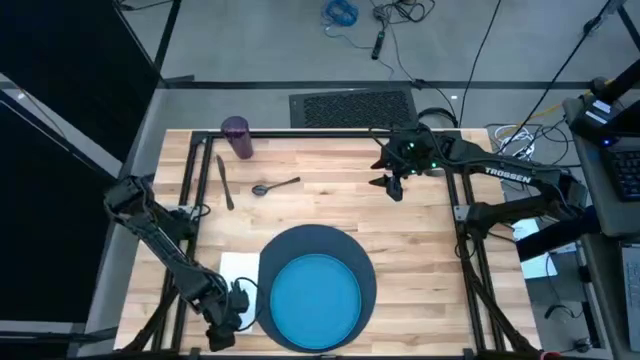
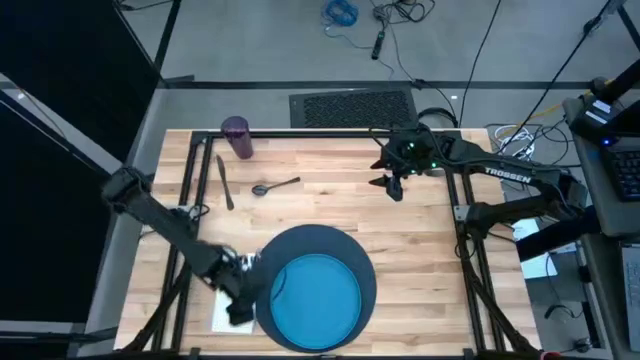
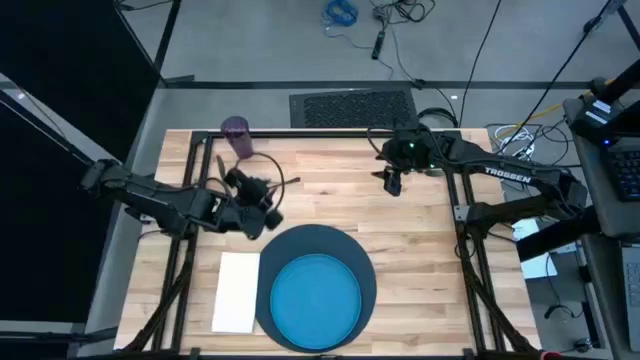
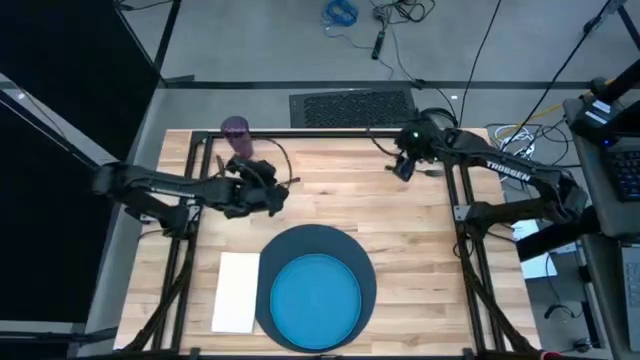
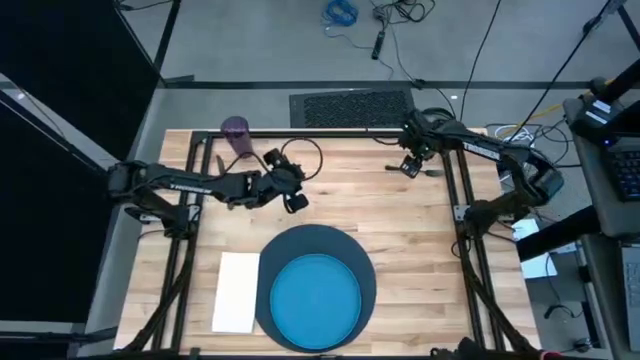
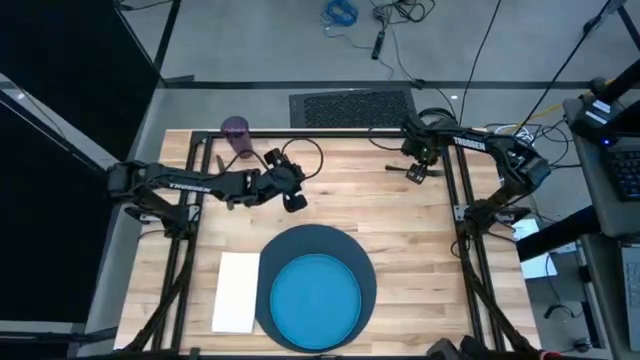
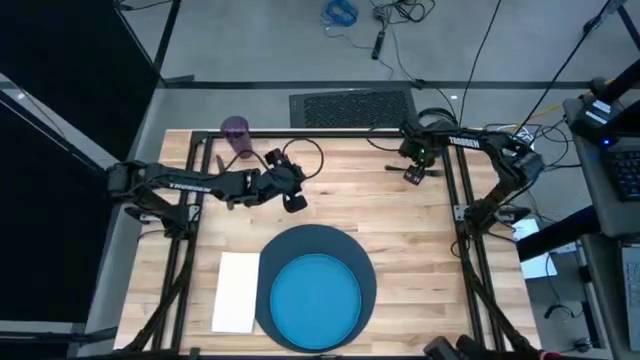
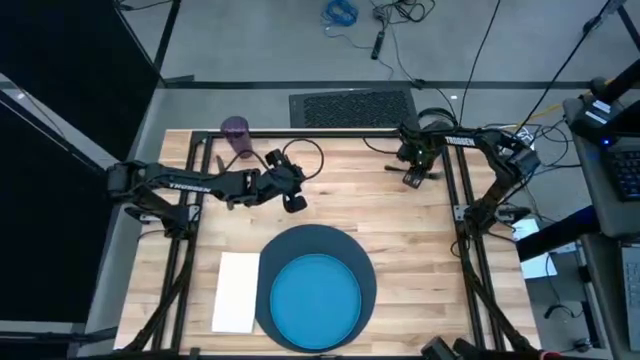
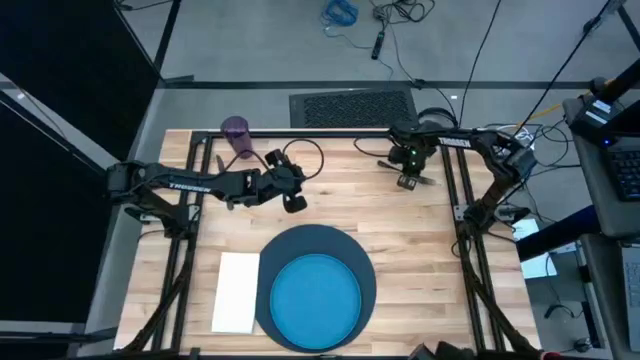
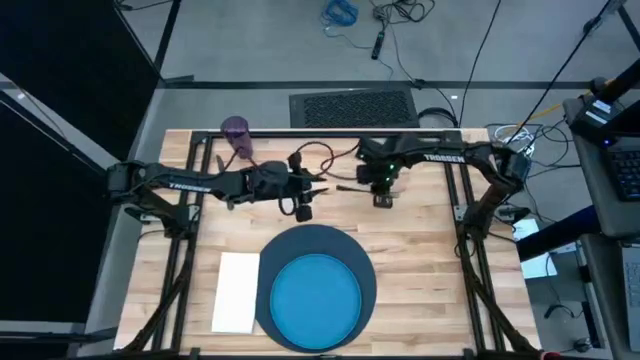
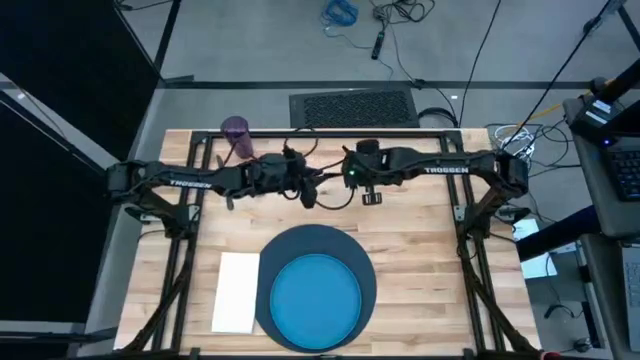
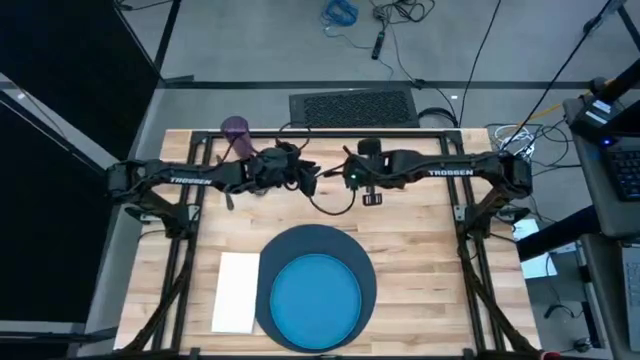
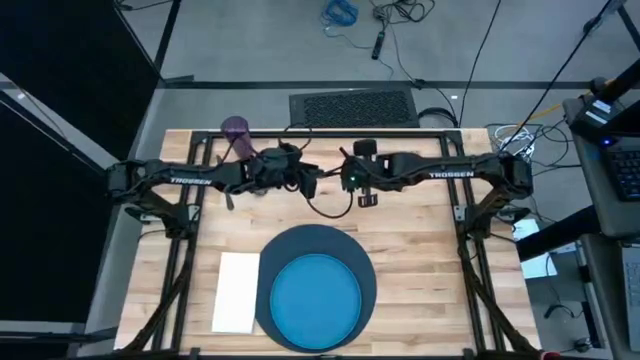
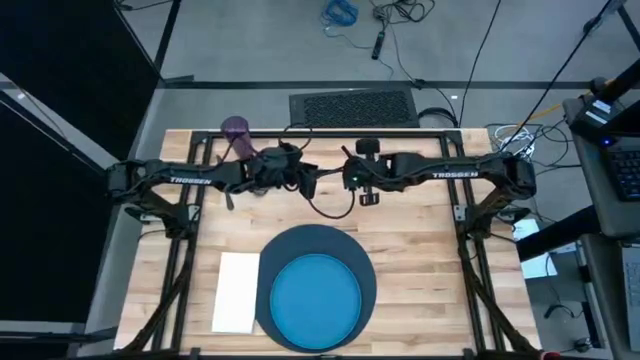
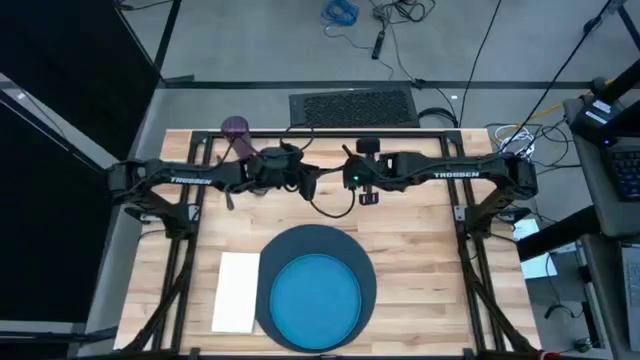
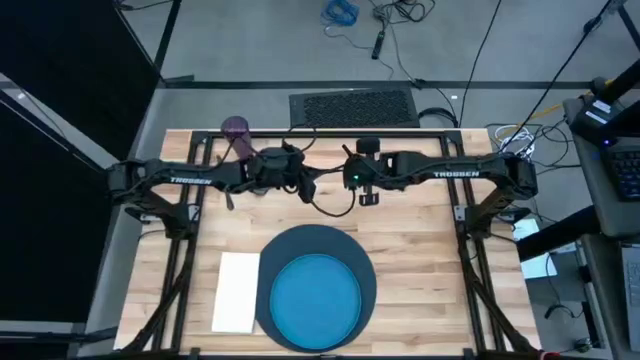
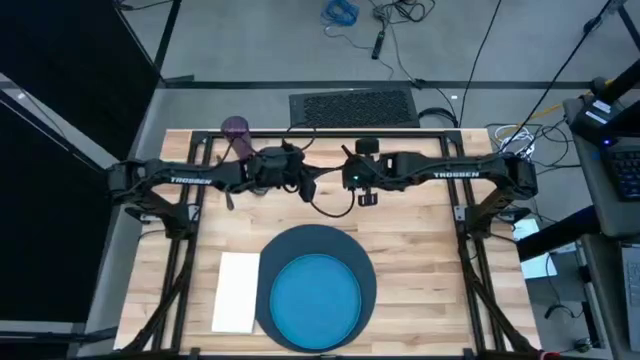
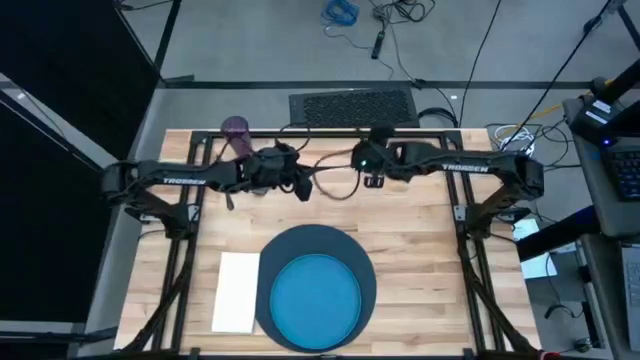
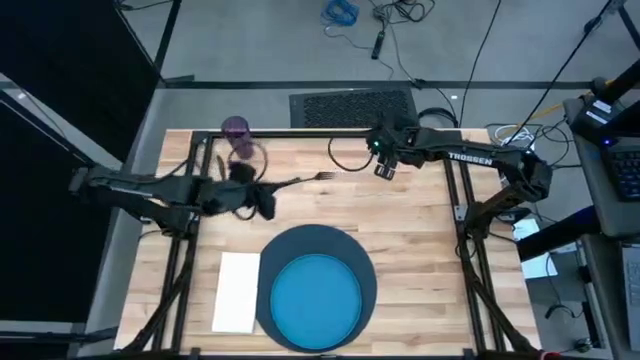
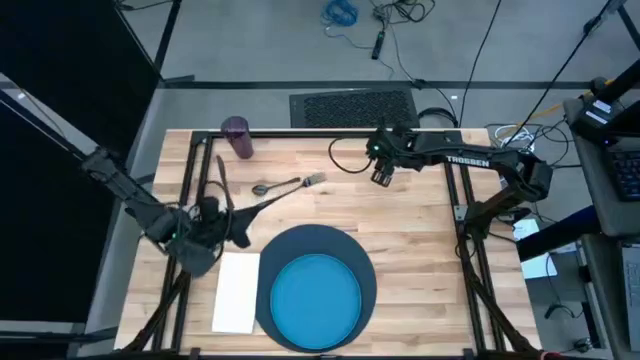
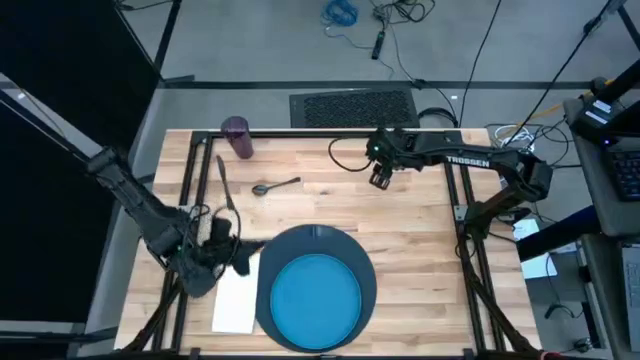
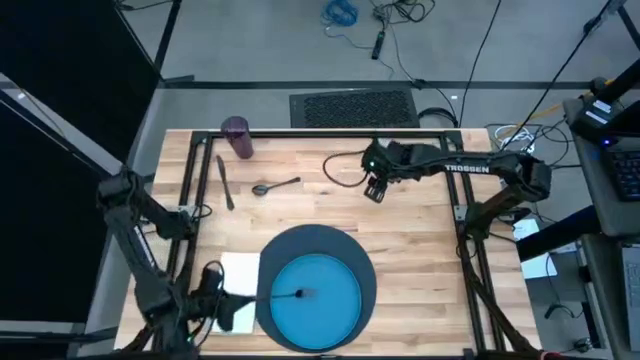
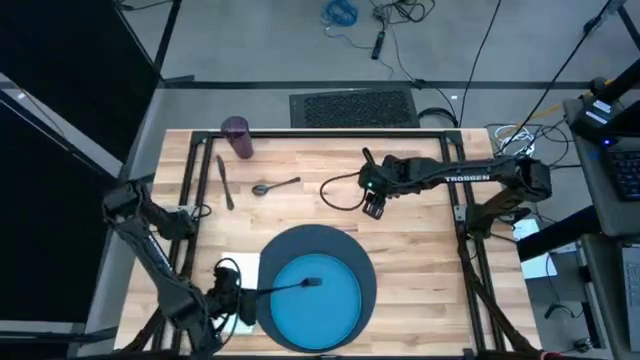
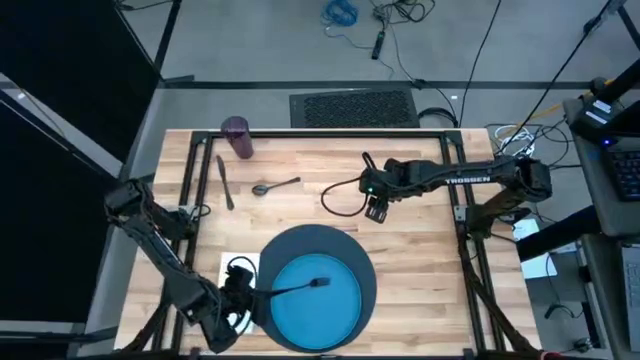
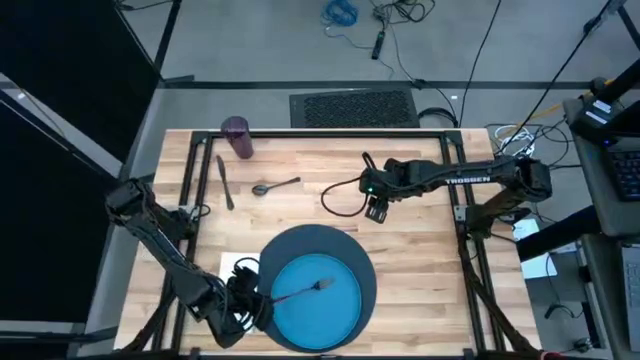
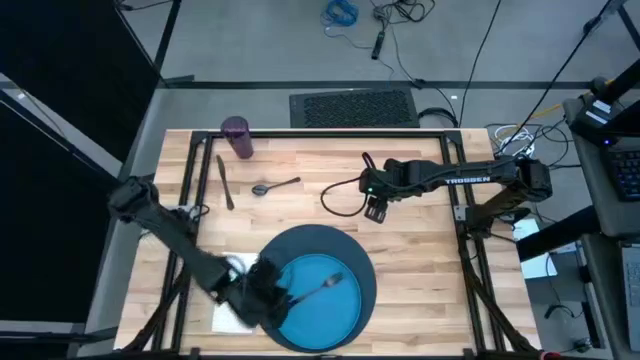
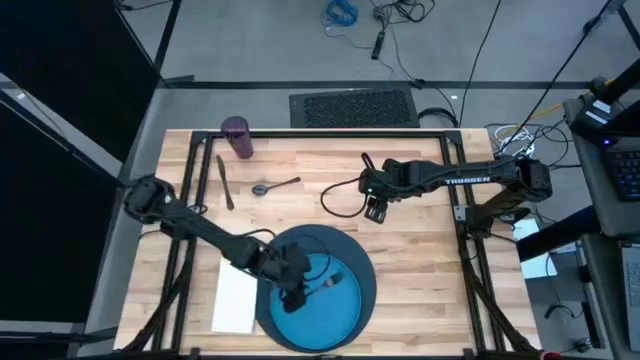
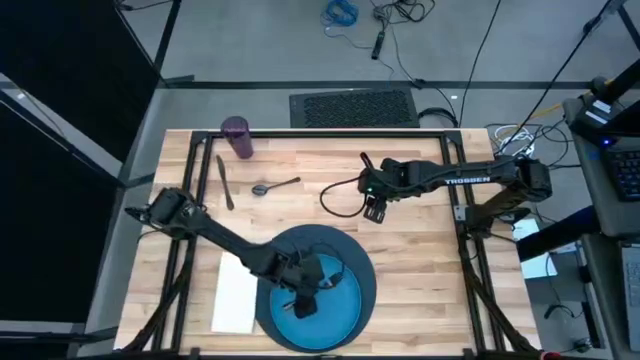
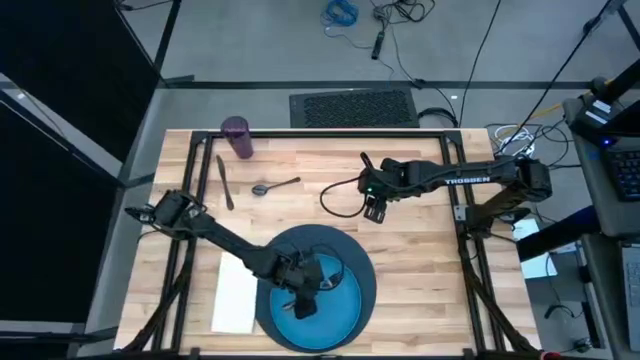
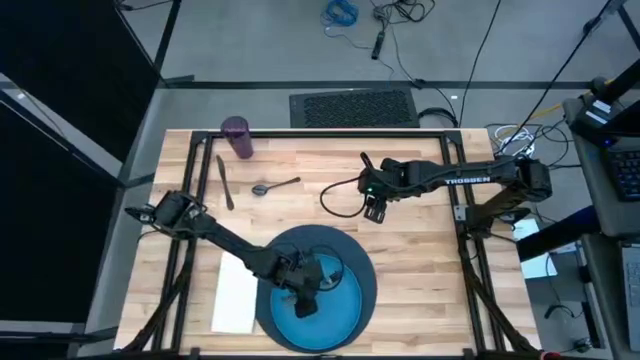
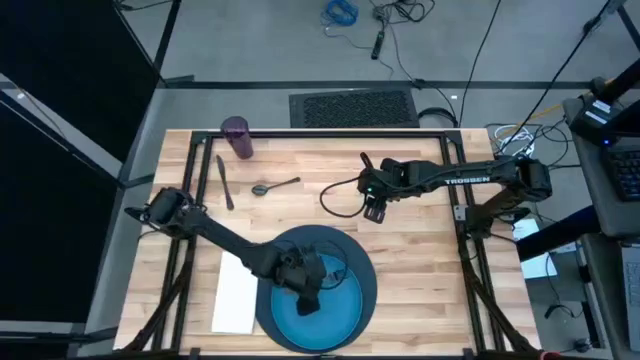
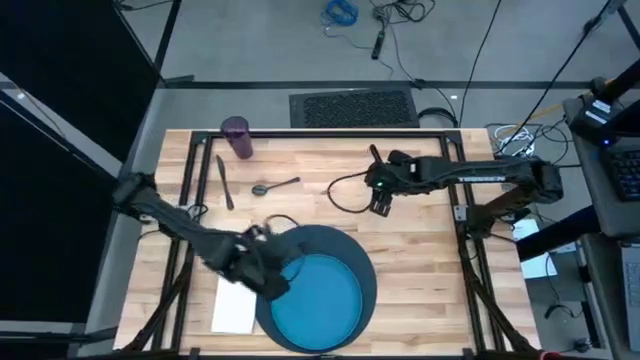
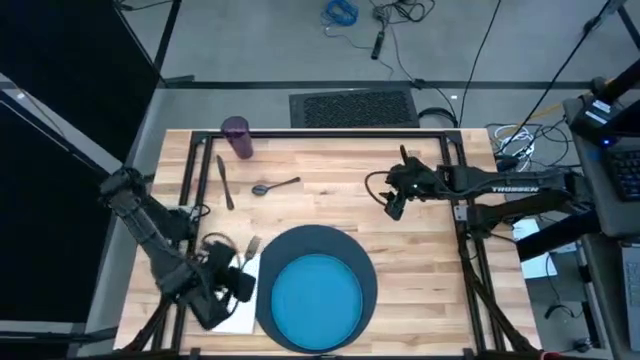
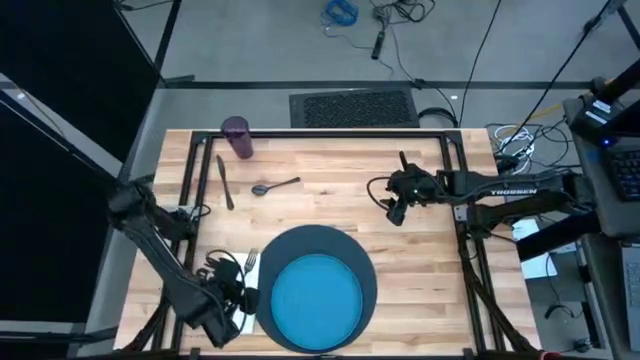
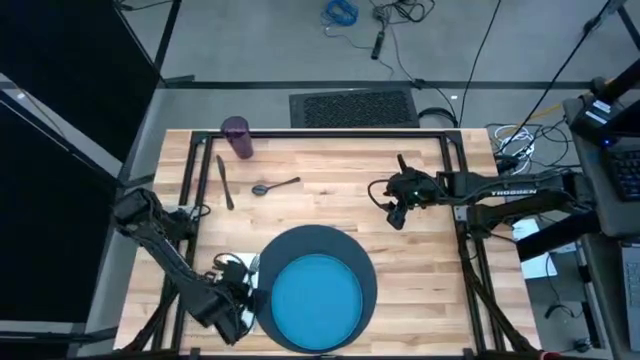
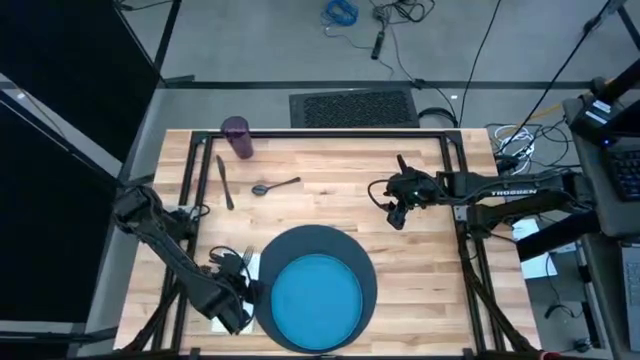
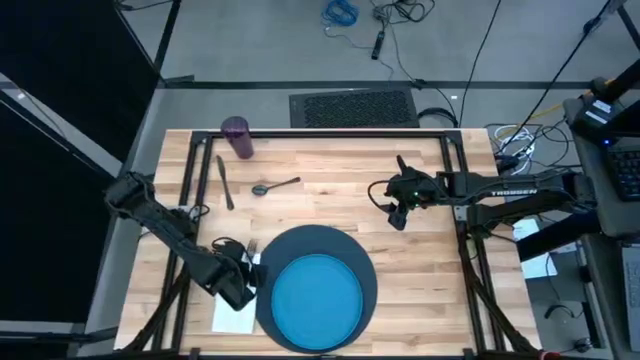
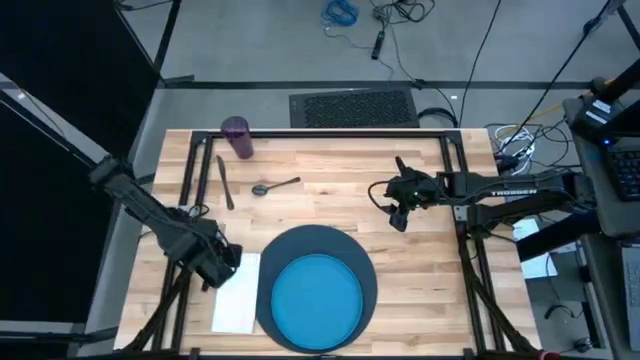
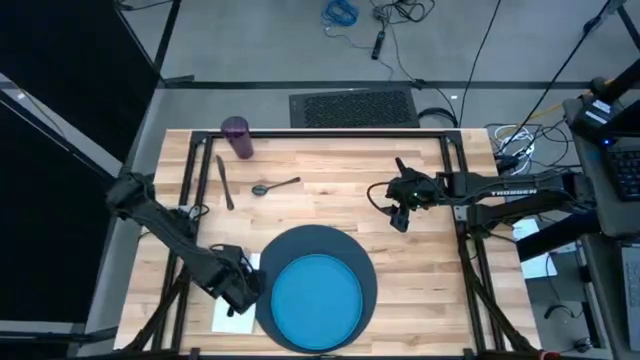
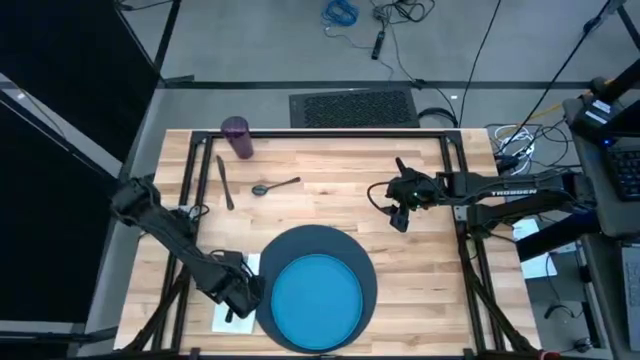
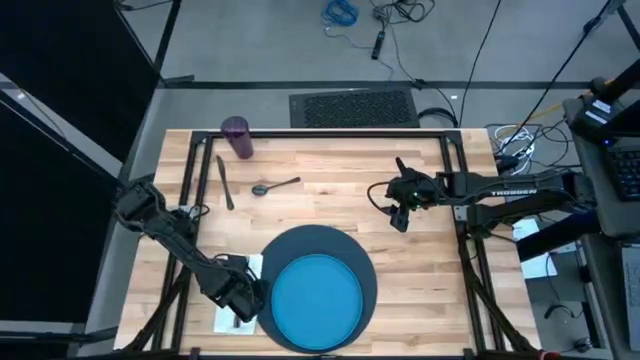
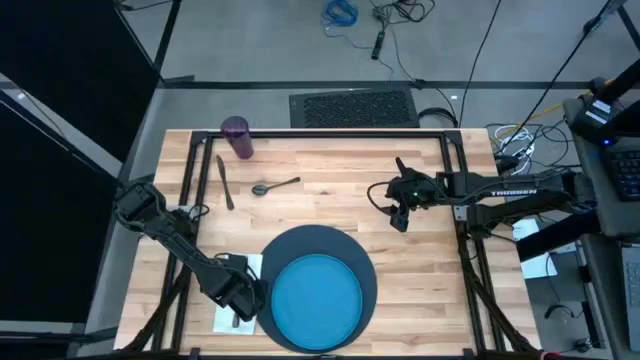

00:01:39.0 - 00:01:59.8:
Task: Set table place
Put the silver fork on top of the white napkin
